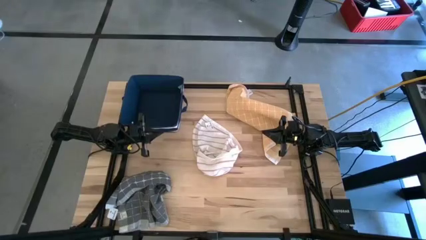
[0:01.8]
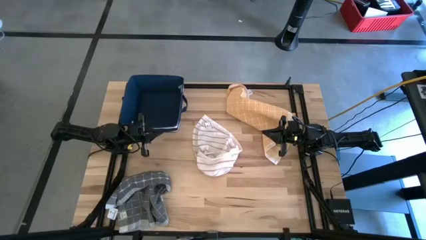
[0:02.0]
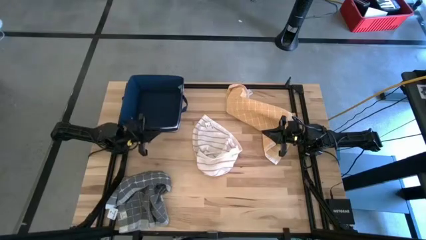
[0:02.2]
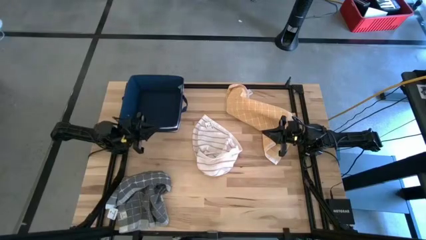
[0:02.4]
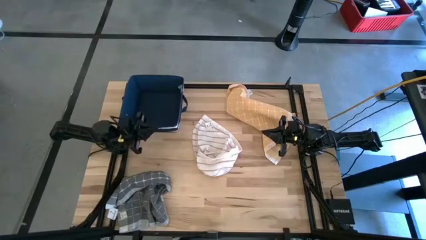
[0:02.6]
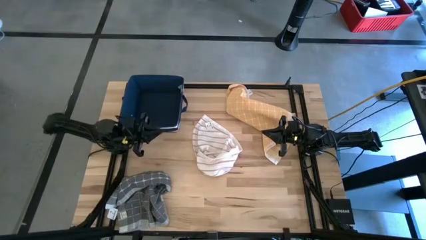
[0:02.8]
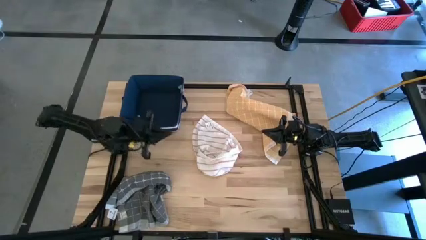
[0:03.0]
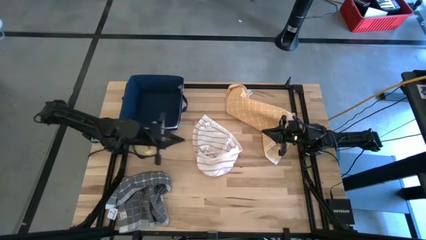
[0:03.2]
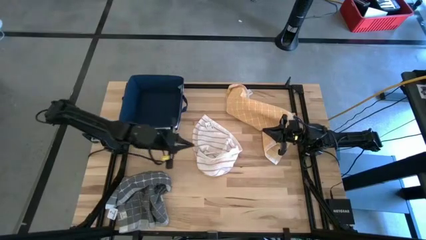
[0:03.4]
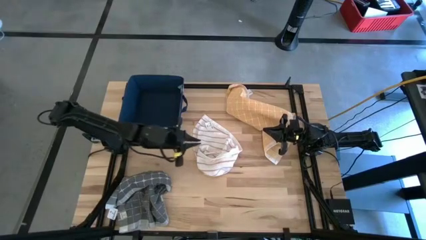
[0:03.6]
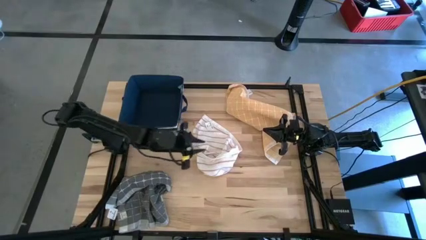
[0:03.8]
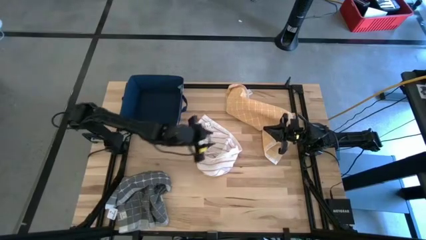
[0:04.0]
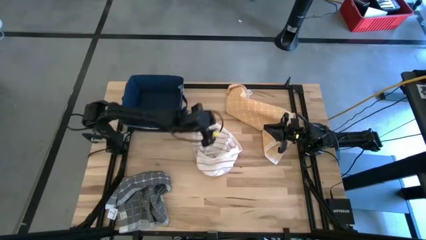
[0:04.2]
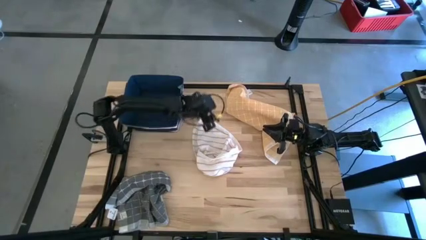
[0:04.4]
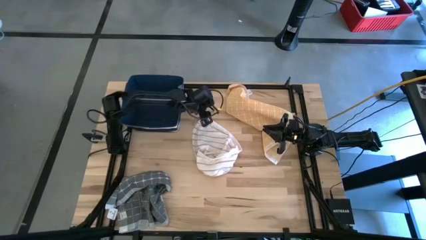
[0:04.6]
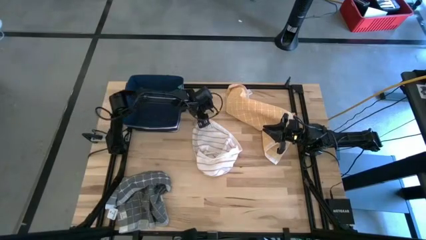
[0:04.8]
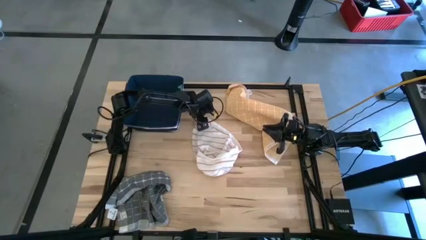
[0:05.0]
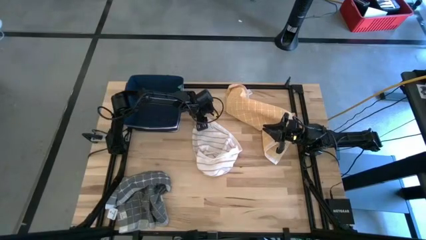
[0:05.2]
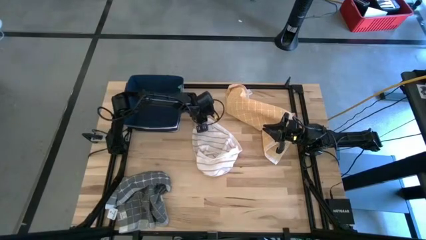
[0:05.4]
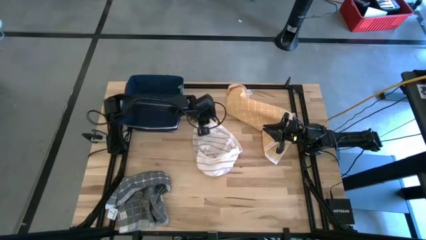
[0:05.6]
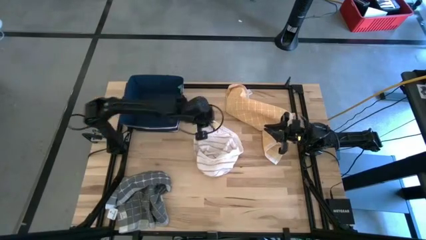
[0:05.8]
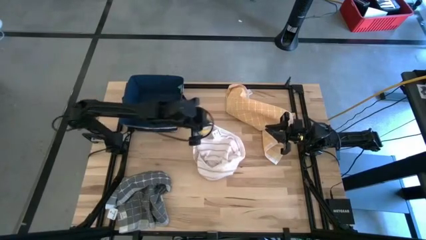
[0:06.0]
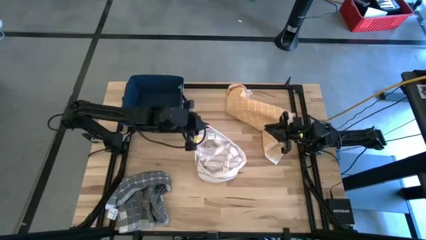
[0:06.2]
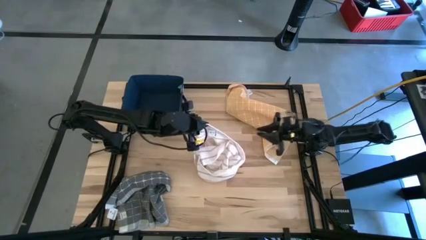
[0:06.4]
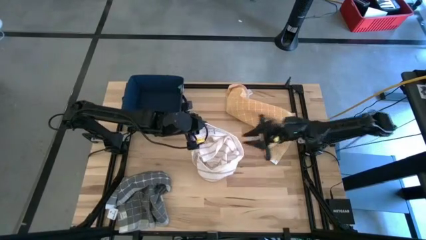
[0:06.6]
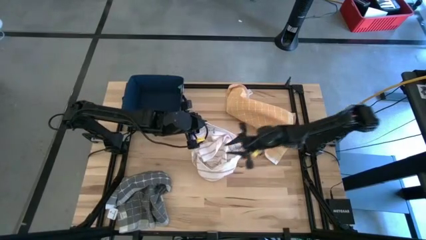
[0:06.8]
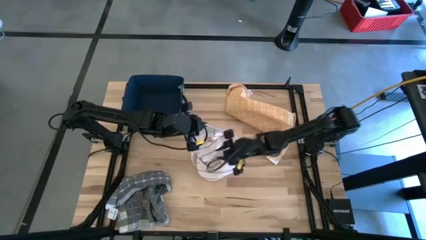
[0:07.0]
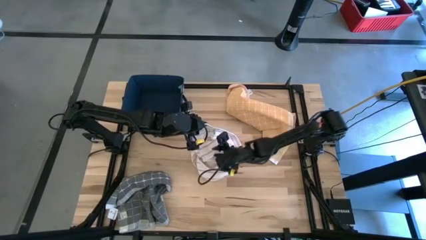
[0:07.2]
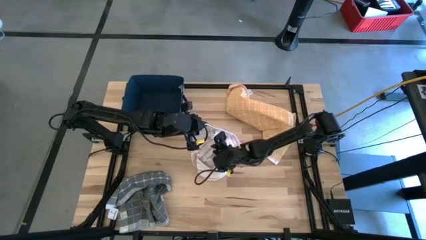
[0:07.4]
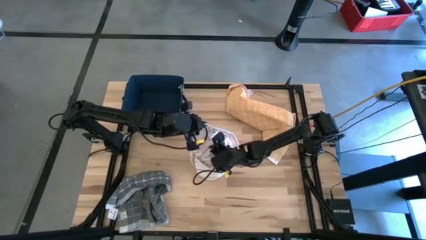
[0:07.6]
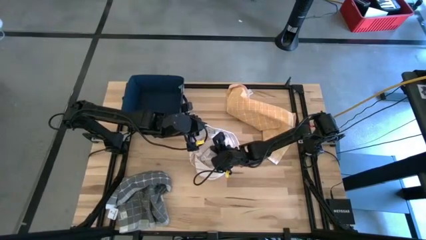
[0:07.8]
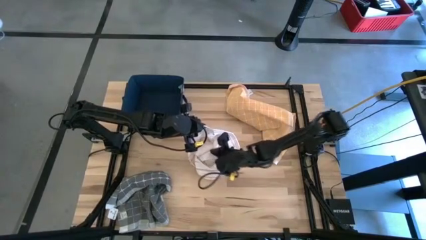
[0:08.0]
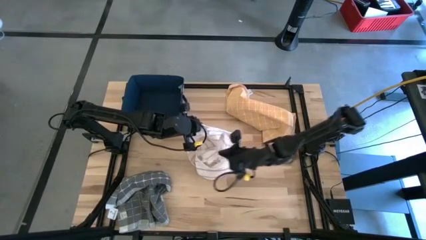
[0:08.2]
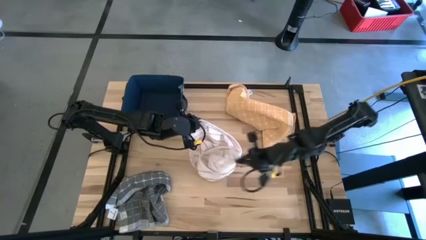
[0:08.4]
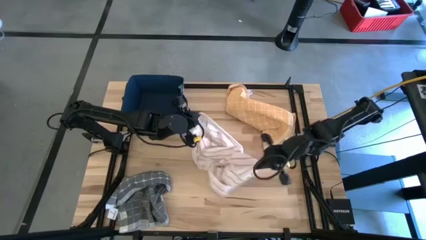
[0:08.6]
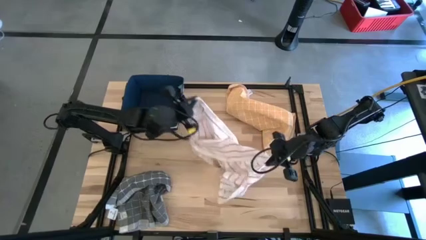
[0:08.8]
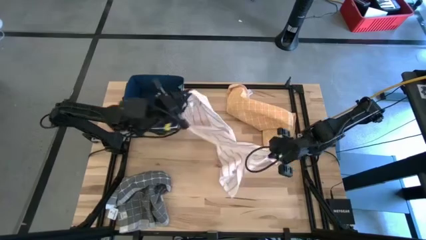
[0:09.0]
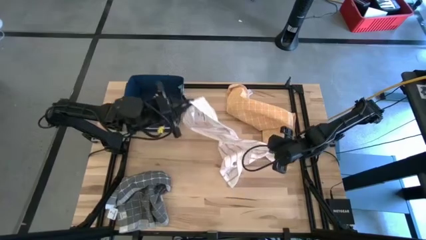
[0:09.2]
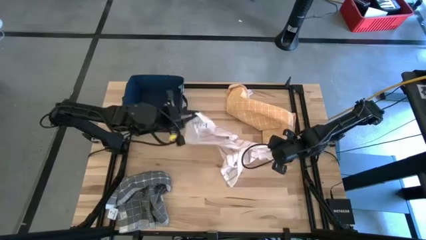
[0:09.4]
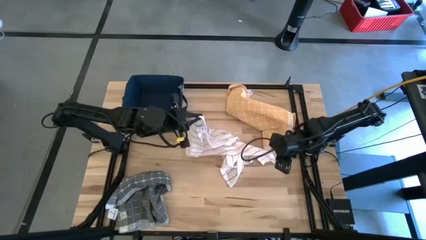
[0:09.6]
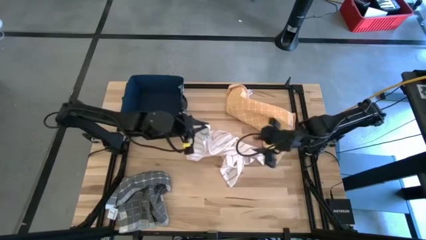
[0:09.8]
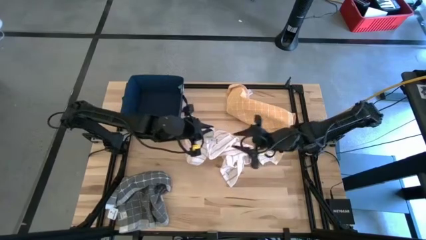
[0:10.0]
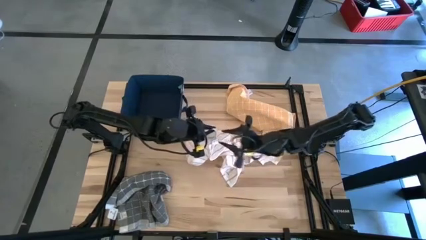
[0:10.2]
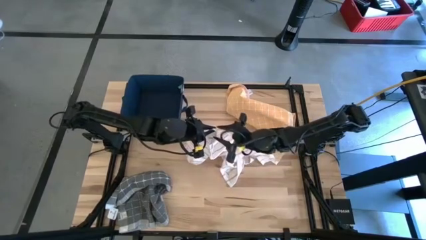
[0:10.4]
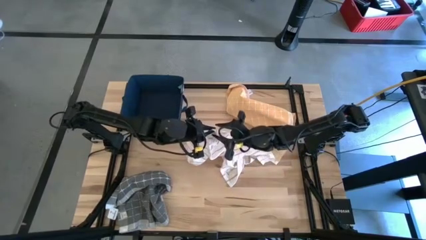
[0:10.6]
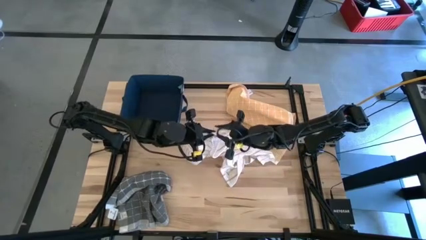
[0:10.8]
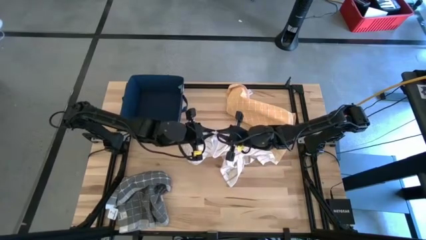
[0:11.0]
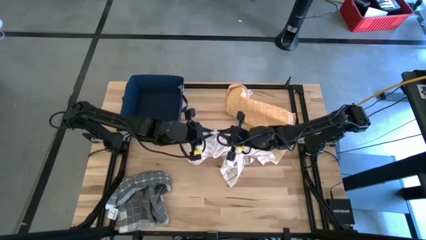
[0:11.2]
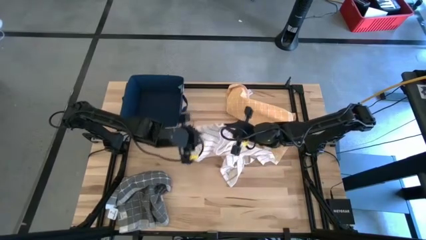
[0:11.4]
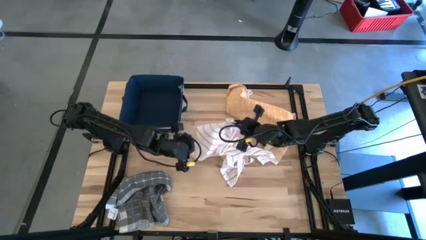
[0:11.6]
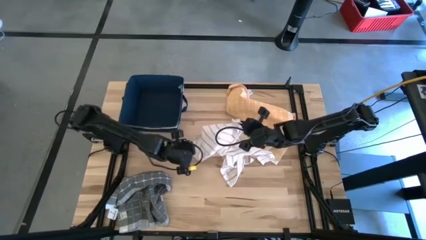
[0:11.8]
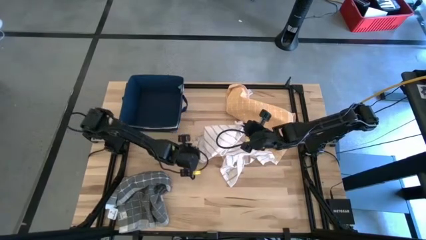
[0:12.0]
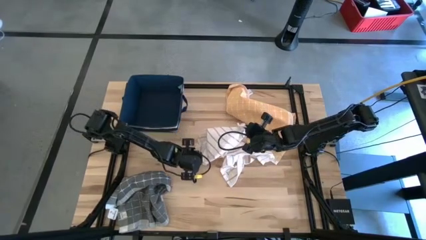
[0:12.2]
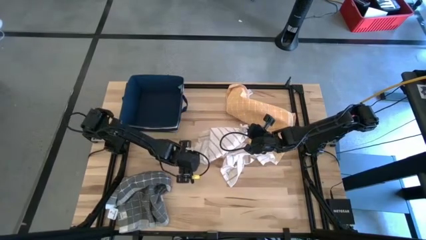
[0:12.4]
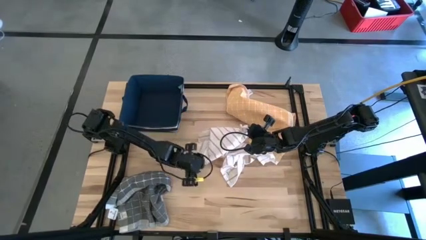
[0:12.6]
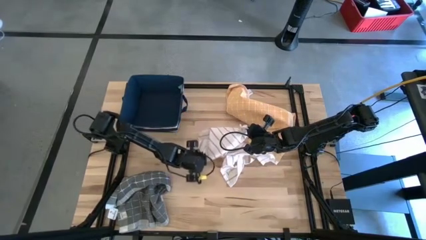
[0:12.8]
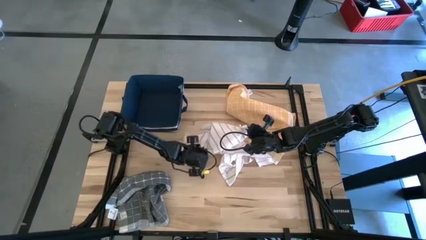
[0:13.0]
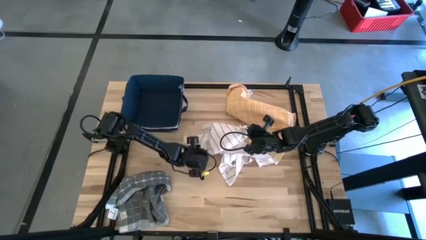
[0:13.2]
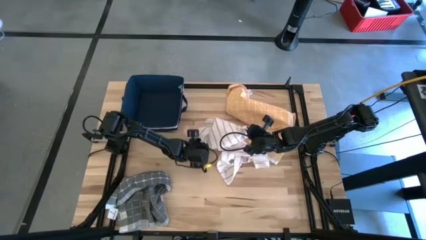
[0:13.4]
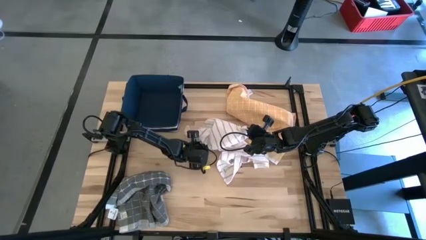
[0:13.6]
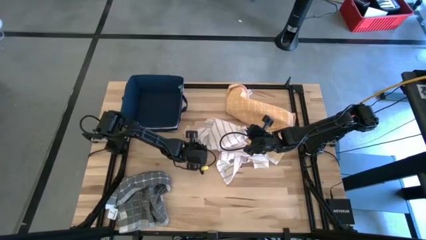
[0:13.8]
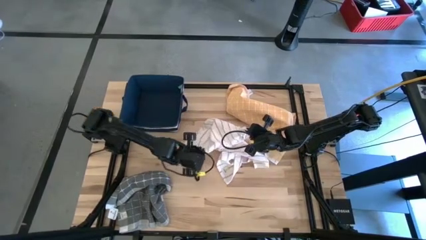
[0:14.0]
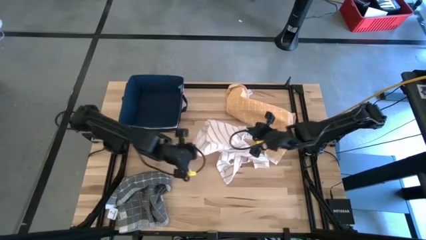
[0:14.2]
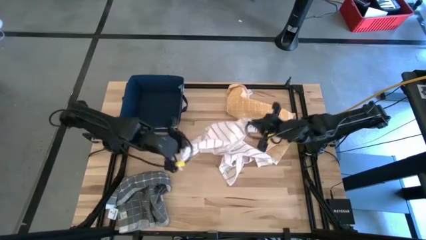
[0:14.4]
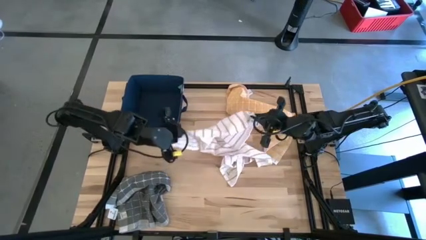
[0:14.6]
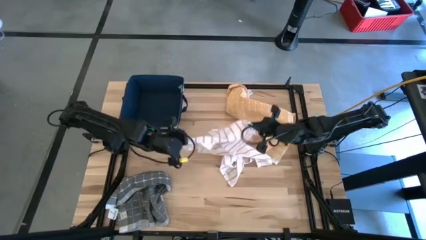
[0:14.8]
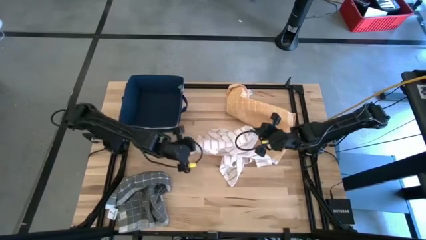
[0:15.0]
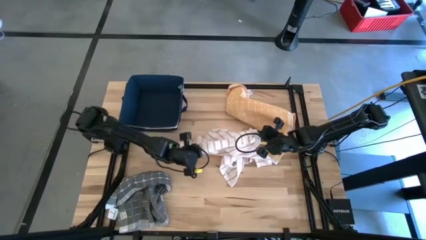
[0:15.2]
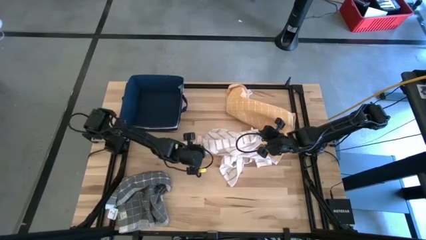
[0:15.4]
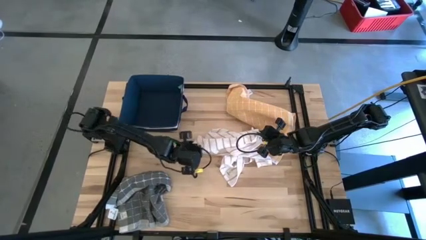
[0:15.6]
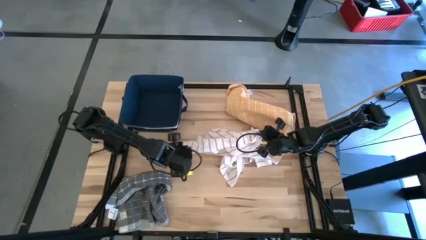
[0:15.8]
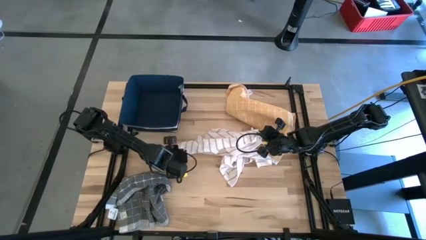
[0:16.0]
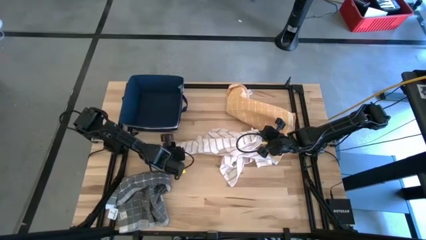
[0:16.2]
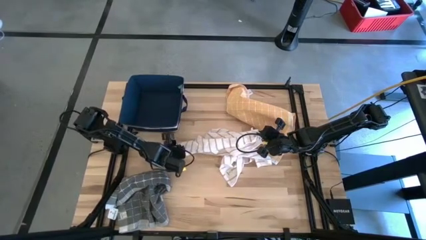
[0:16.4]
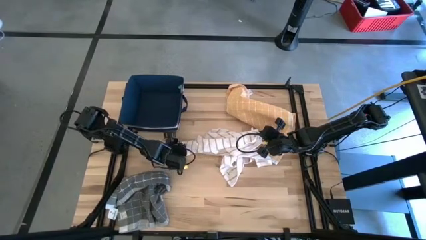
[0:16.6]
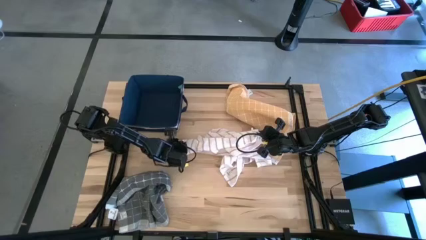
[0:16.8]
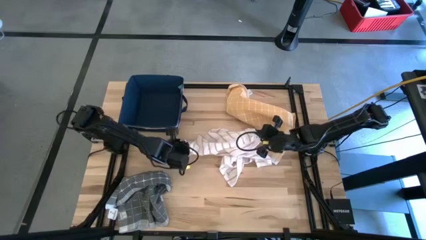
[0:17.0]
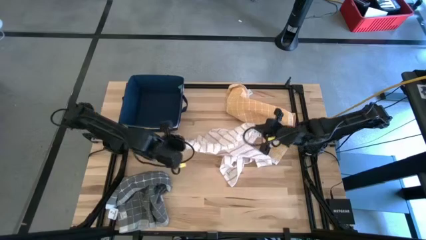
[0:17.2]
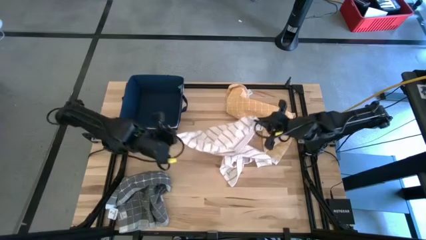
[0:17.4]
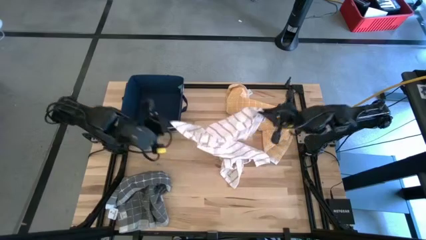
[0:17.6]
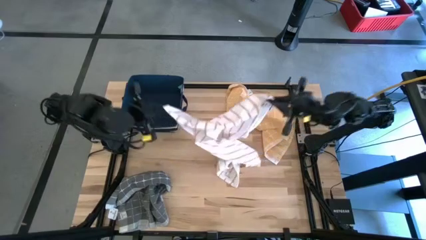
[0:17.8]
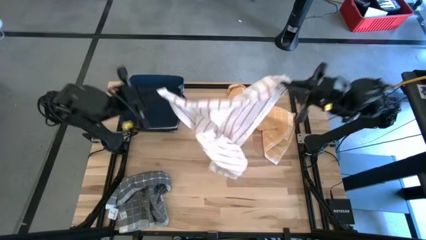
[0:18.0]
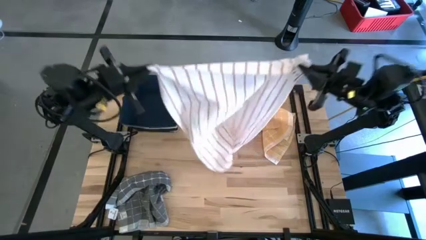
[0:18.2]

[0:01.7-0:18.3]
Task: Fold towel
Fold the white towel
